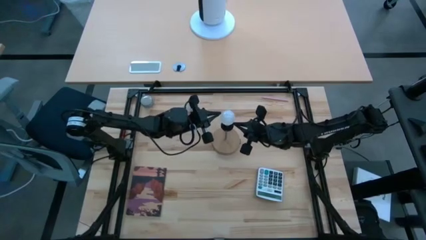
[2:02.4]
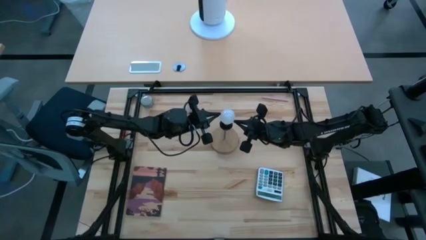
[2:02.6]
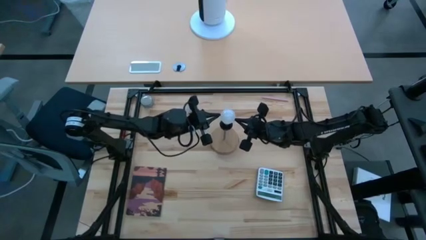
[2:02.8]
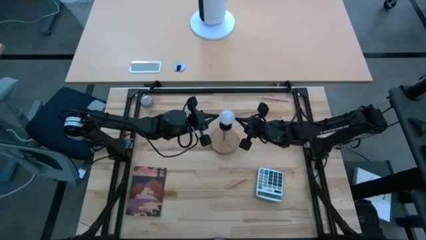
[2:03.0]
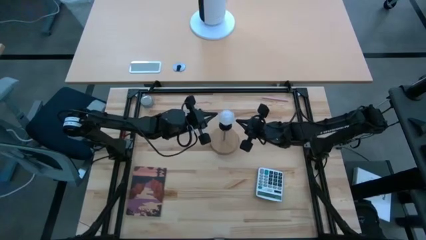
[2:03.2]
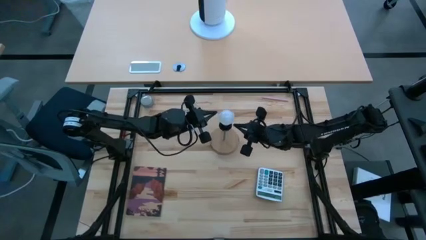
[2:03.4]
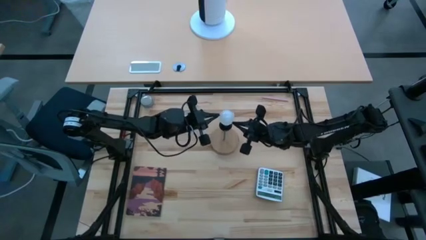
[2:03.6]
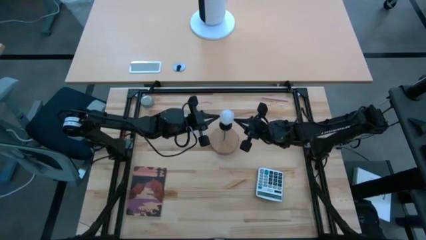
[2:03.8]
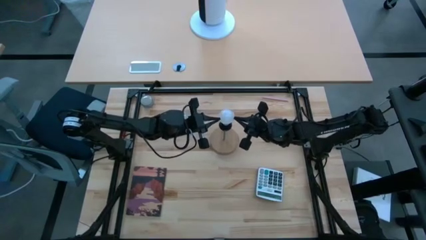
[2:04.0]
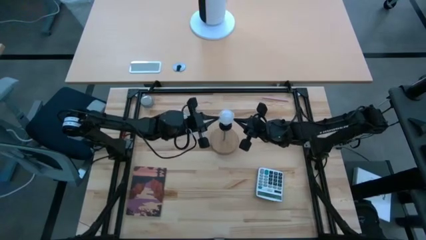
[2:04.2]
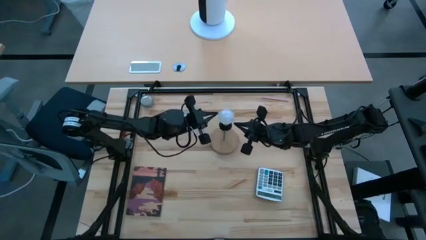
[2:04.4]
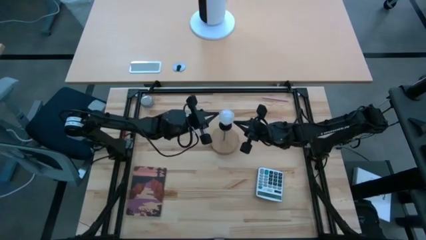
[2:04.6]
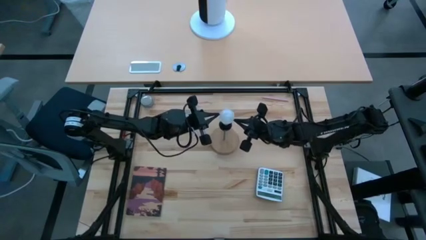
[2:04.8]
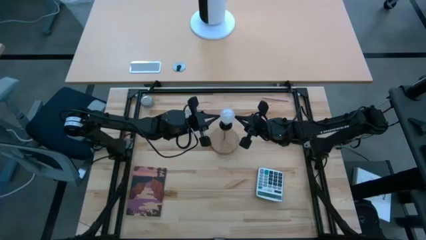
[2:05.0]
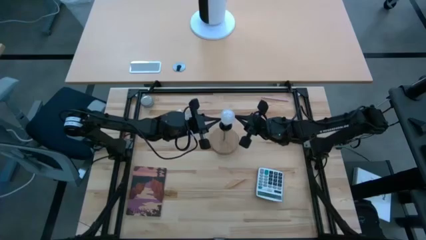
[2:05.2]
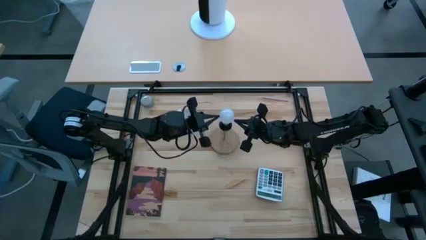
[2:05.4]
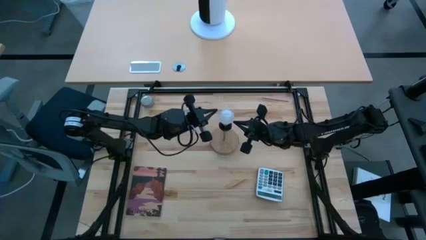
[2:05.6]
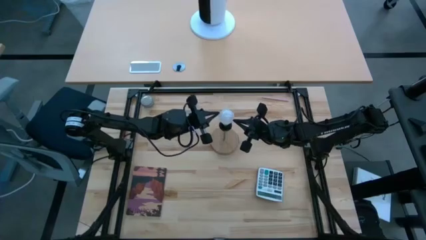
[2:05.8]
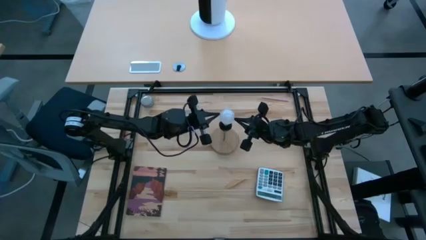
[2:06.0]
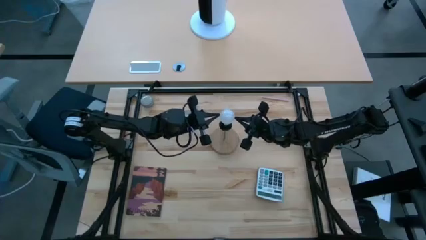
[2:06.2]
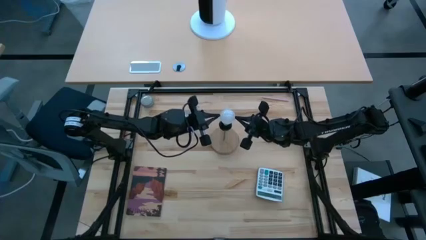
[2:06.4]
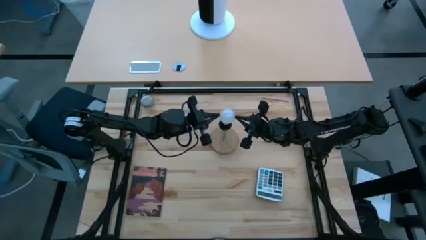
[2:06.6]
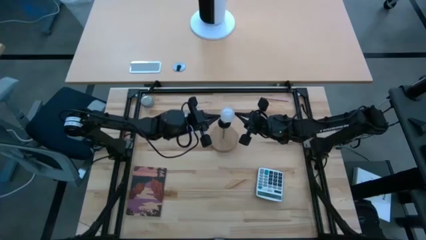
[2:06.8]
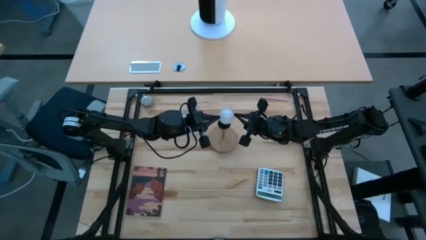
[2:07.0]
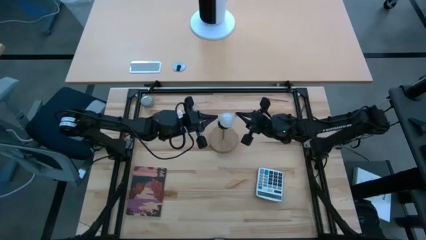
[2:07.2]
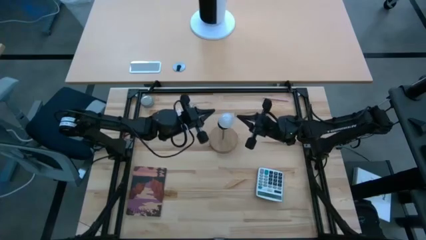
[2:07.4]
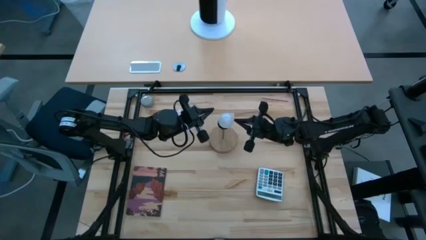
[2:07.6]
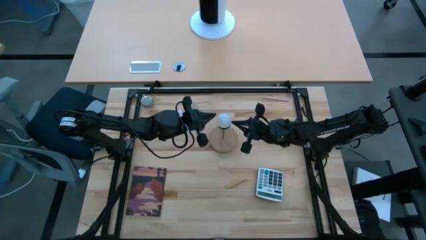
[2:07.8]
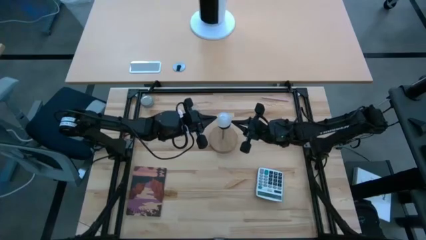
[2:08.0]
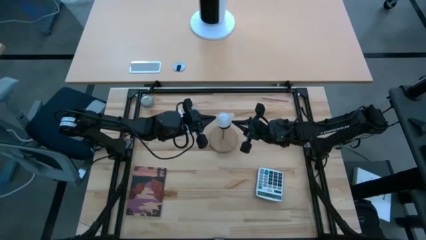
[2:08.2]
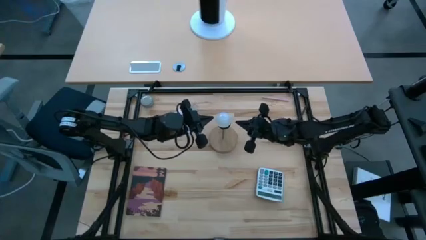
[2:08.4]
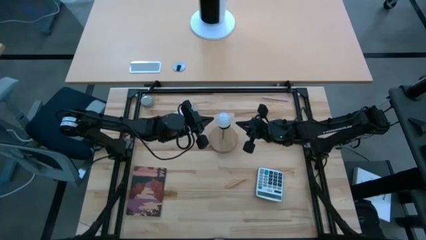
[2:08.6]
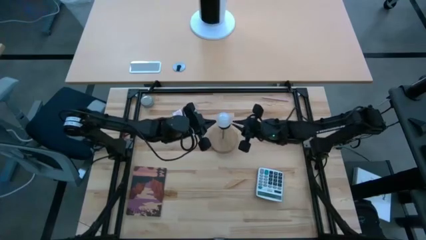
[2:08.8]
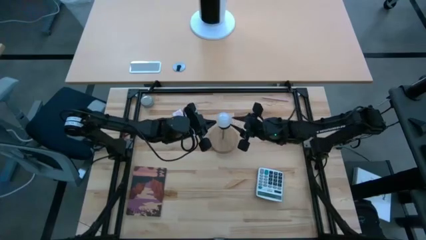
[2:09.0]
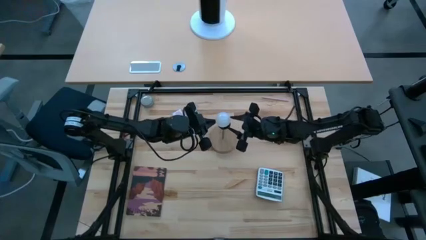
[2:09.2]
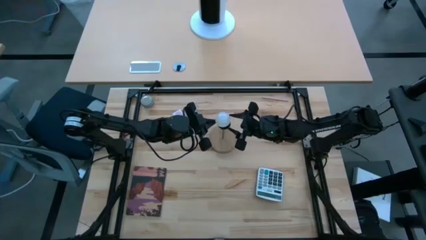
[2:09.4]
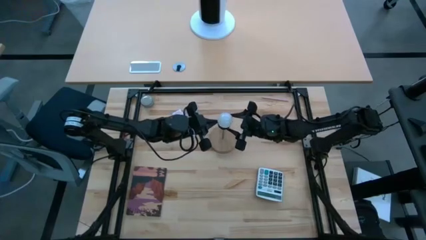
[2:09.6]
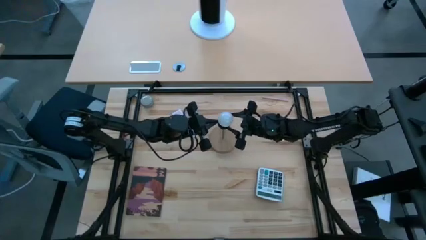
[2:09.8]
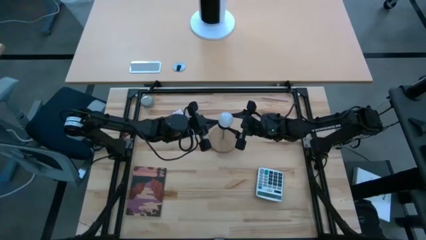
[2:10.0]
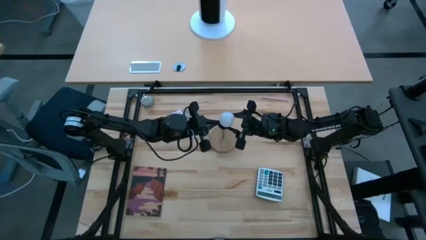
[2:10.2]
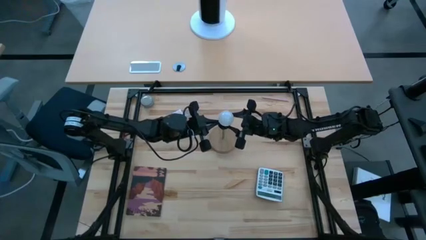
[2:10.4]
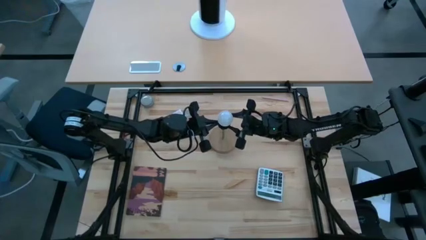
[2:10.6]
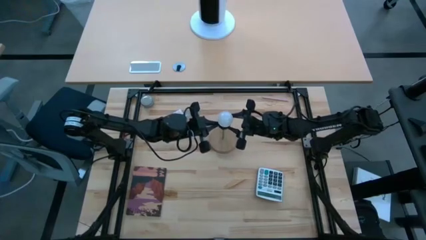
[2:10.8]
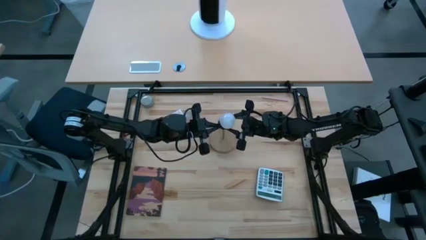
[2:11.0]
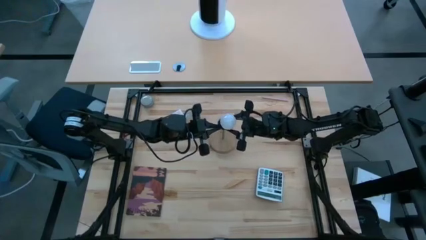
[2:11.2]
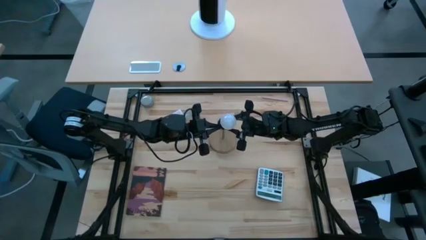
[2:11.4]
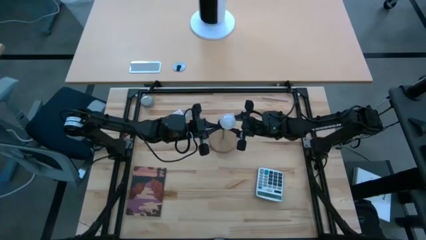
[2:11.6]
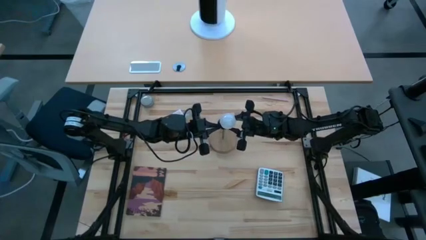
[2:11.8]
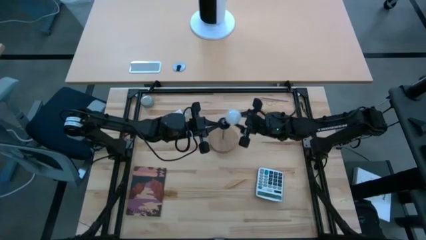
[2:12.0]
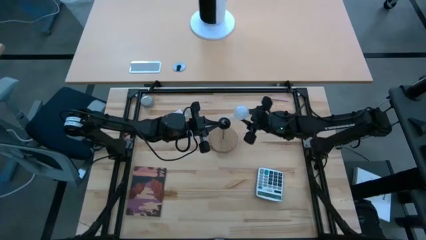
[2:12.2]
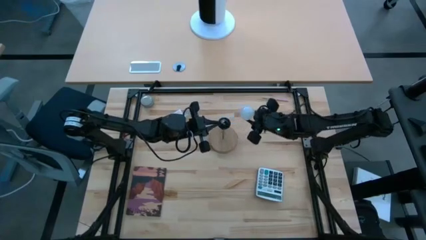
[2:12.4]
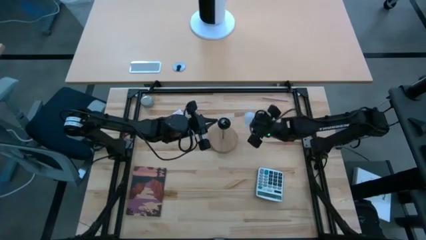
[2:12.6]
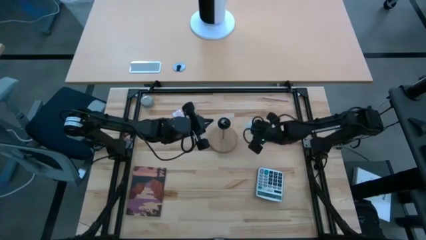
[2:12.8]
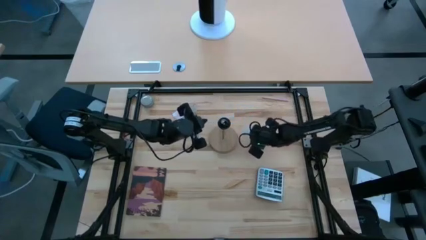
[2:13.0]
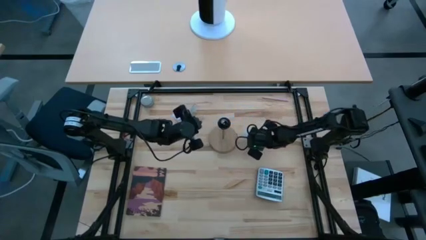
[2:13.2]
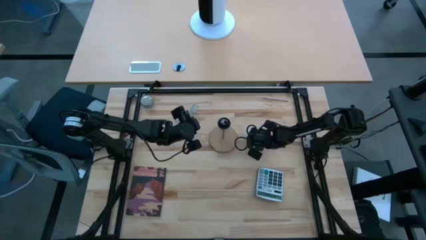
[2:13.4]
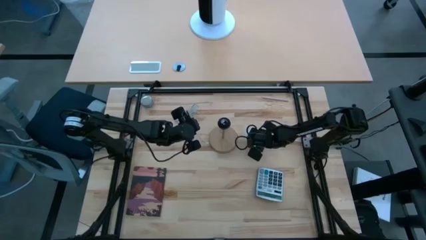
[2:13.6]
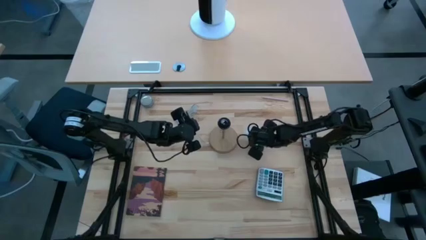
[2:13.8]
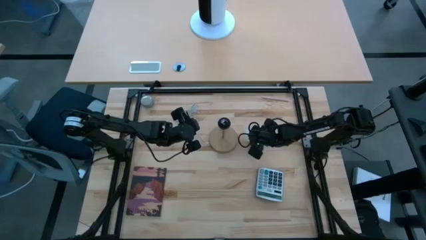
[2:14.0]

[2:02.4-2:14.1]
Task: Screw lightbulb
Remove the lightbulb from the lamp

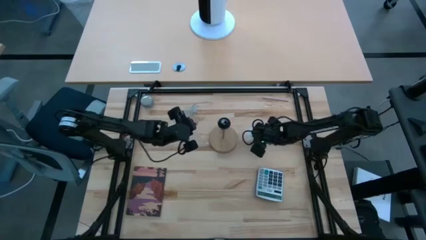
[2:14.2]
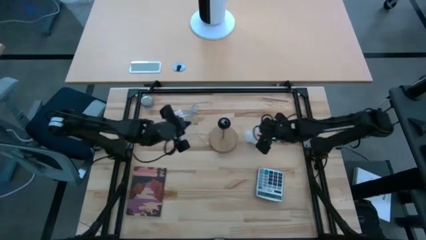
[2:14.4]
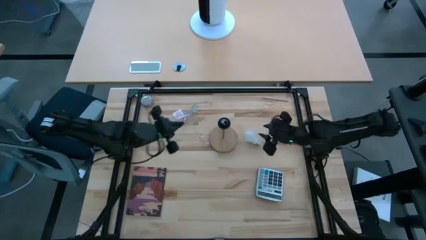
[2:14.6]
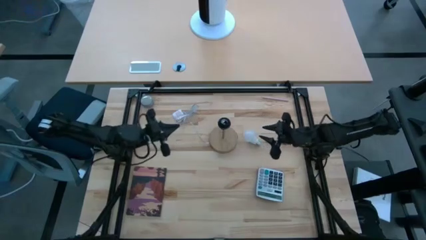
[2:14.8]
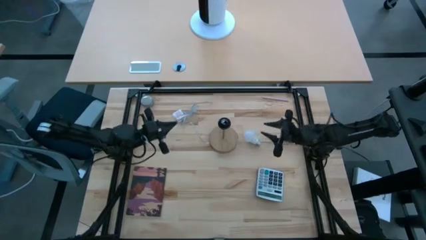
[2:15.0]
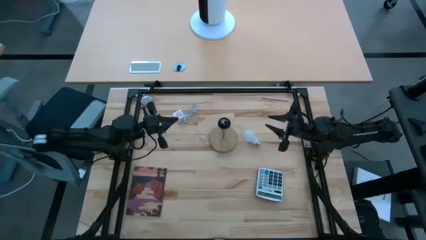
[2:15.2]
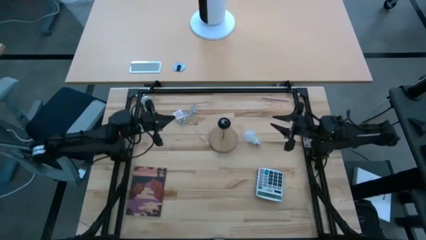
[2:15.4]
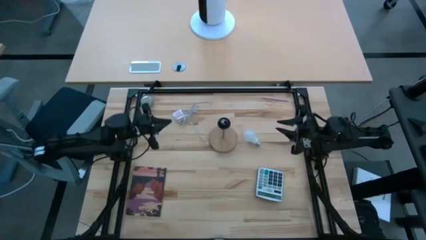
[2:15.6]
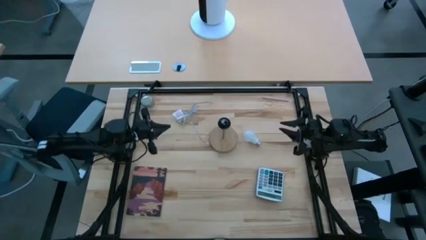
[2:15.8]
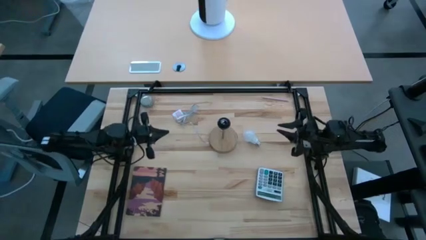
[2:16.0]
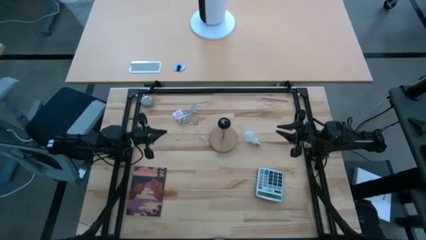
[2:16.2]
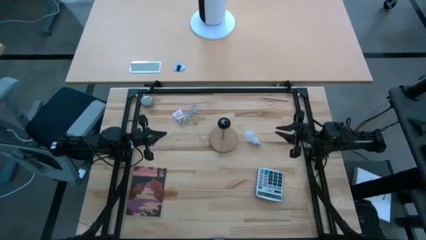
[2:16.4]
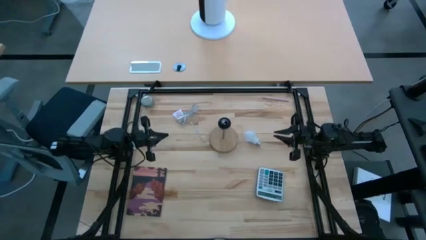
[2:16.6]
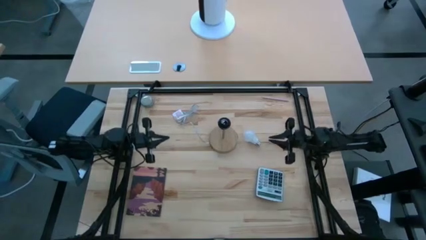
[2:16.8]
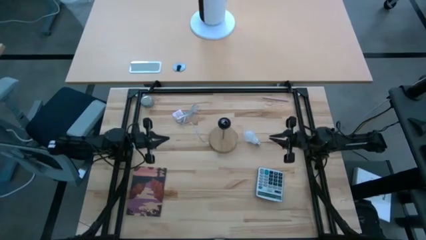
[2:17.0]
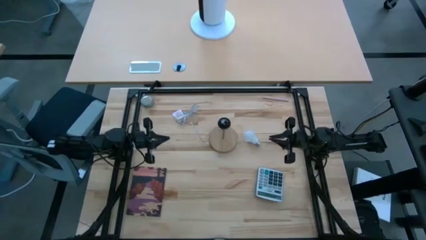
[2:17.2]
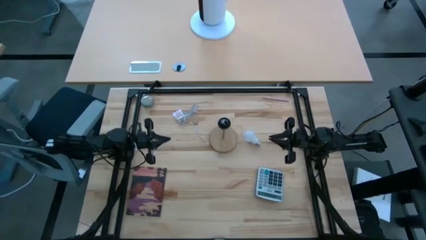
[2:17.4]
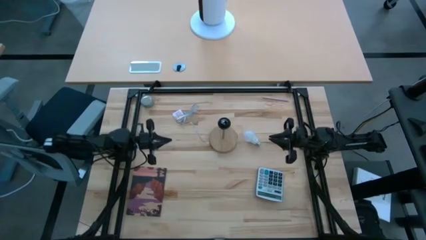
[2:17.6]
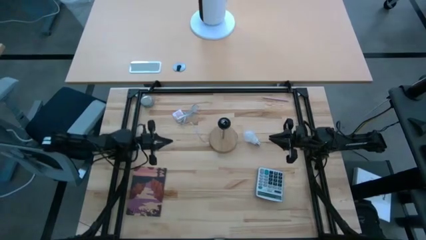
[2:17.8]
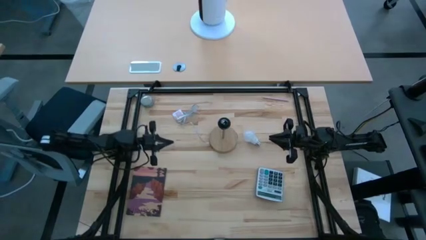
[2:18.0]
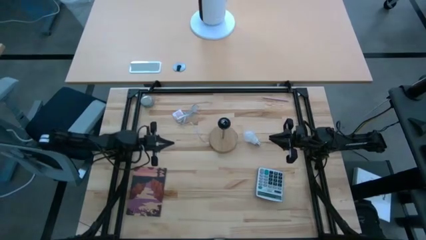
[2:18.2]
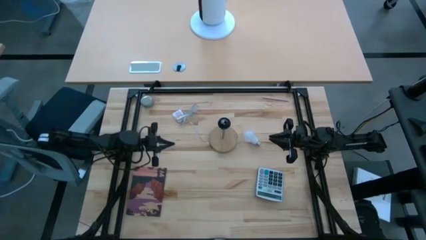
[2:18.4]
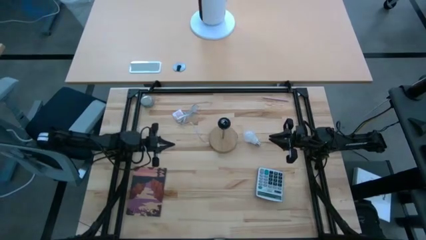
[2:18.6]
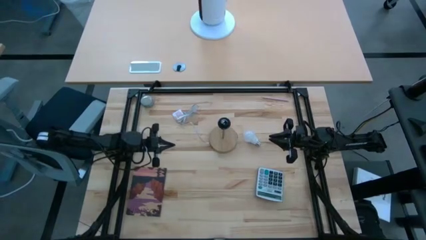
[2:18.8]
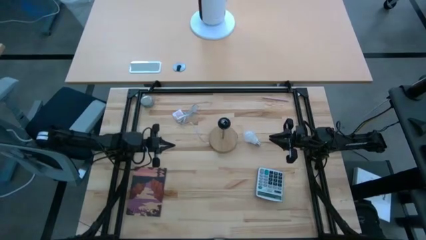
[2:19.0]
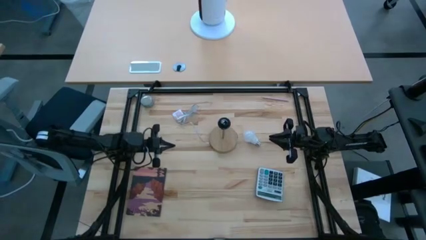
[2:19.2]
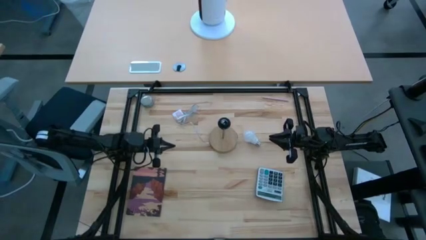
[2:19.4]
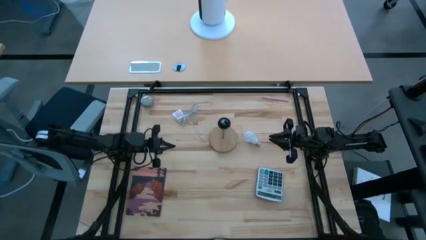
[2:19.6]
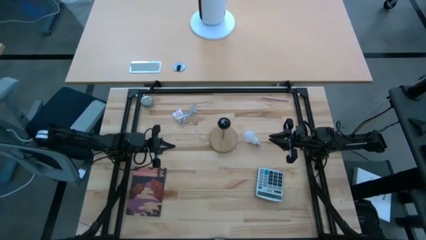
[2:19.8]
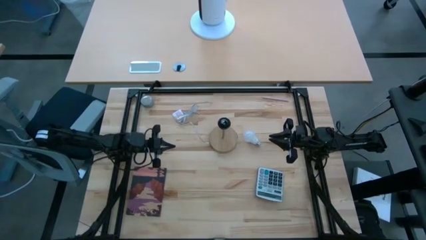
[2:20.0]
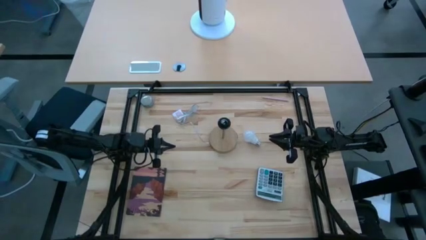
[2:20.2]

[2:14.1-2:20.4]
Return to Home Position
